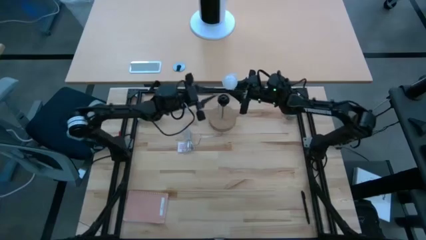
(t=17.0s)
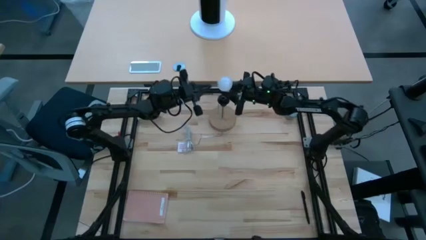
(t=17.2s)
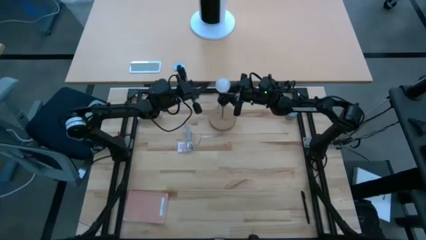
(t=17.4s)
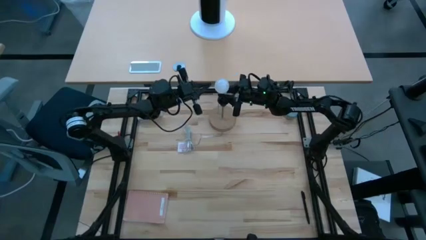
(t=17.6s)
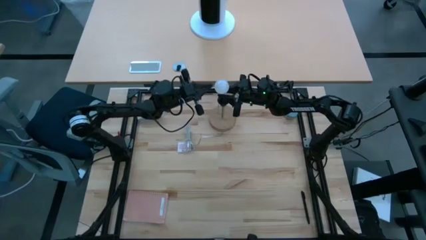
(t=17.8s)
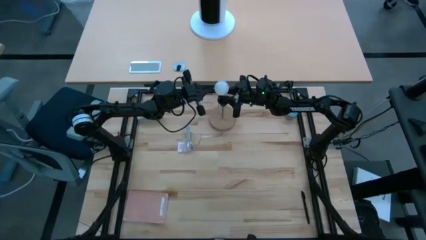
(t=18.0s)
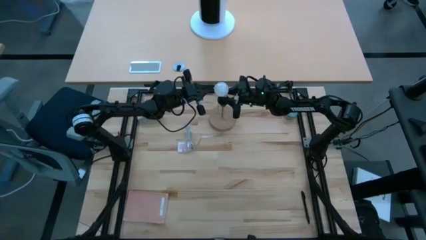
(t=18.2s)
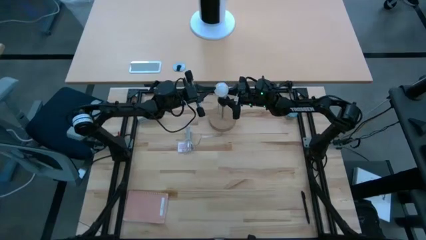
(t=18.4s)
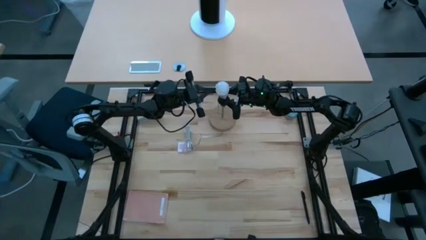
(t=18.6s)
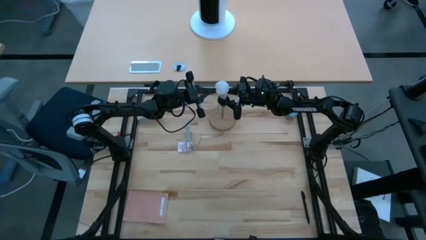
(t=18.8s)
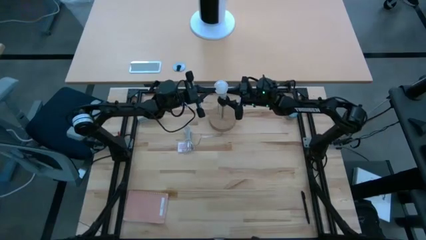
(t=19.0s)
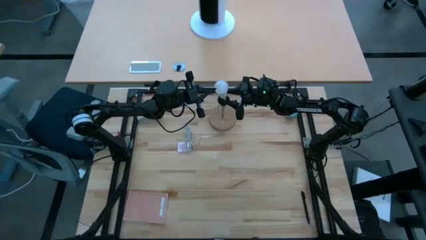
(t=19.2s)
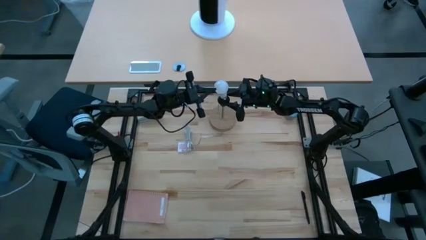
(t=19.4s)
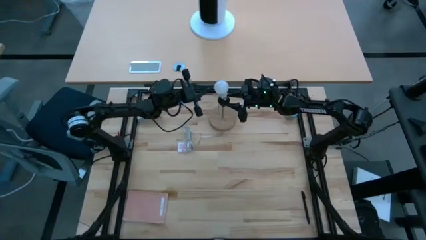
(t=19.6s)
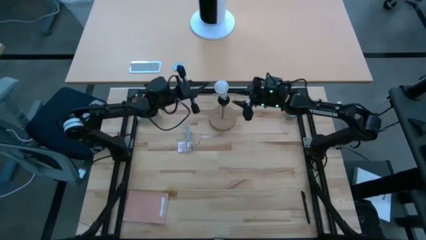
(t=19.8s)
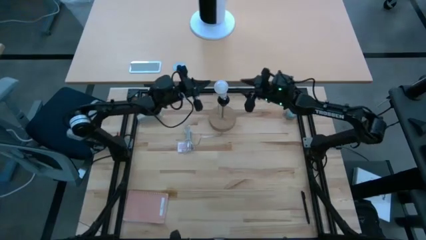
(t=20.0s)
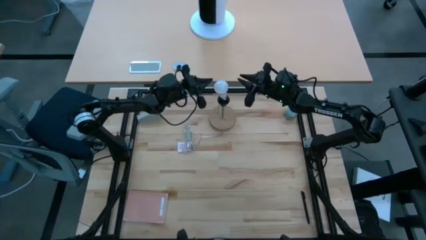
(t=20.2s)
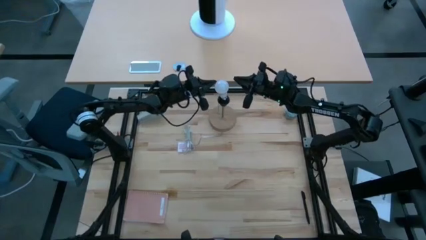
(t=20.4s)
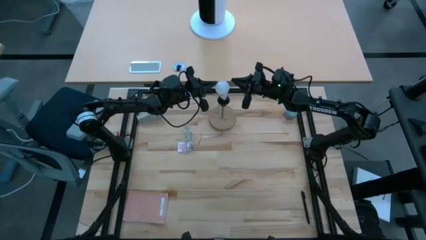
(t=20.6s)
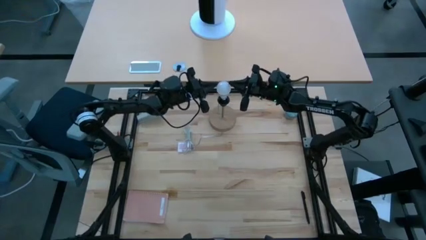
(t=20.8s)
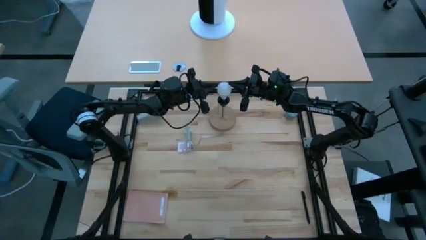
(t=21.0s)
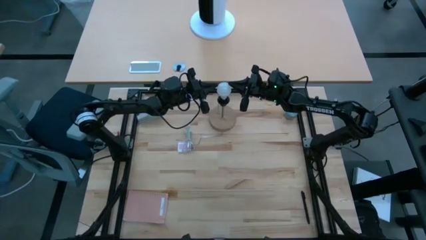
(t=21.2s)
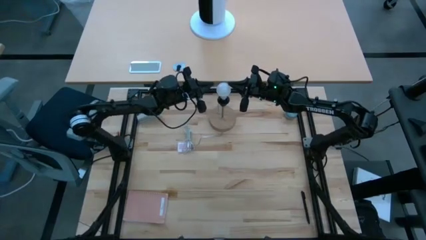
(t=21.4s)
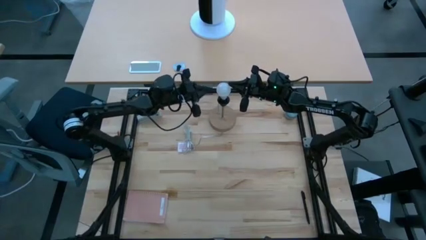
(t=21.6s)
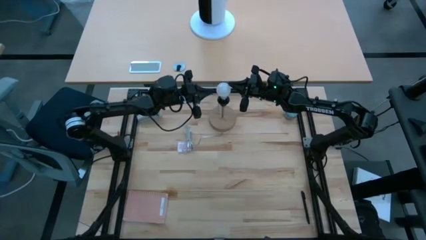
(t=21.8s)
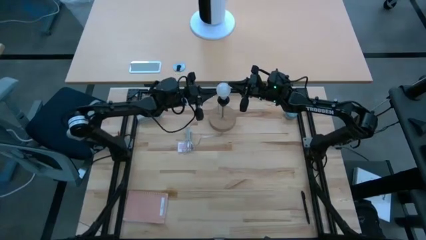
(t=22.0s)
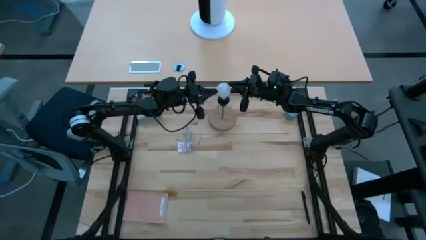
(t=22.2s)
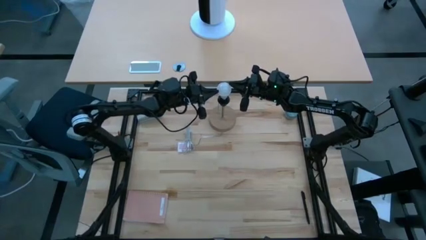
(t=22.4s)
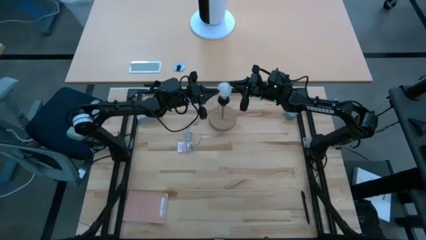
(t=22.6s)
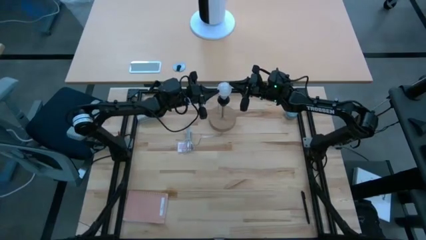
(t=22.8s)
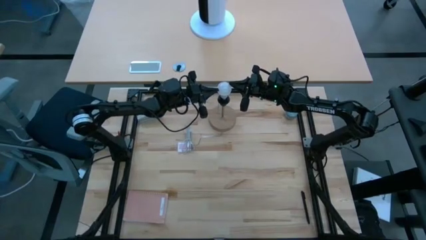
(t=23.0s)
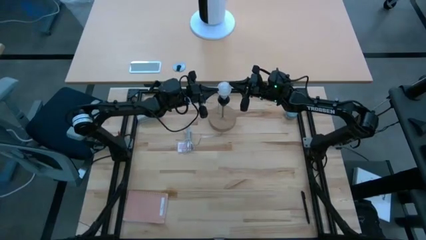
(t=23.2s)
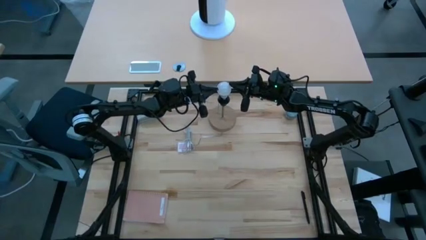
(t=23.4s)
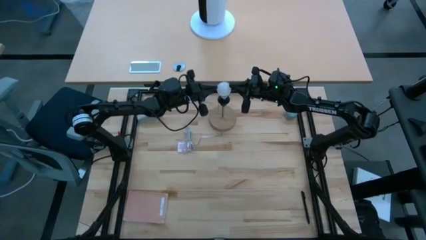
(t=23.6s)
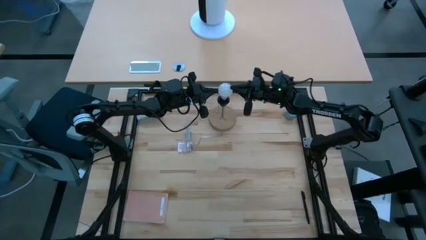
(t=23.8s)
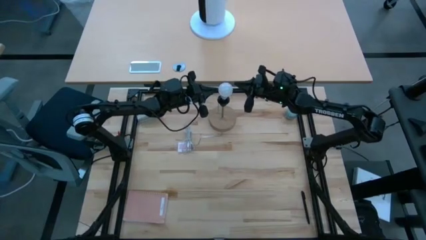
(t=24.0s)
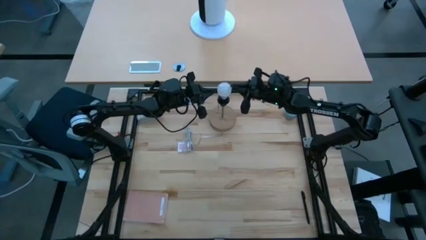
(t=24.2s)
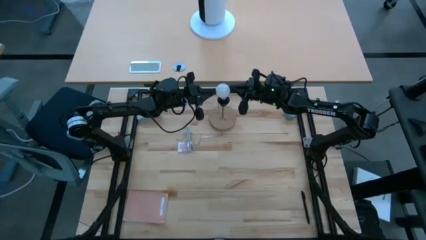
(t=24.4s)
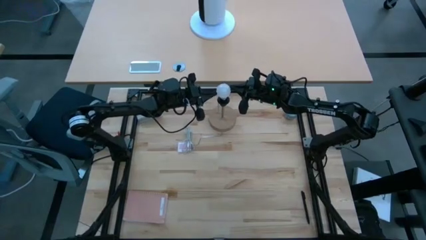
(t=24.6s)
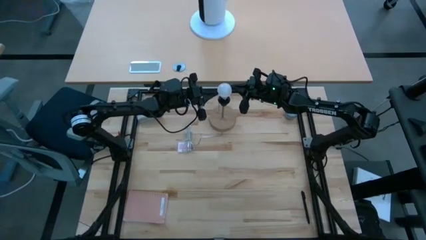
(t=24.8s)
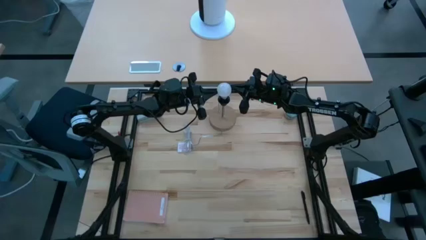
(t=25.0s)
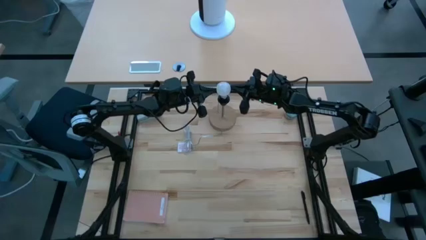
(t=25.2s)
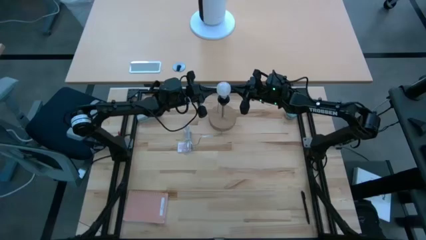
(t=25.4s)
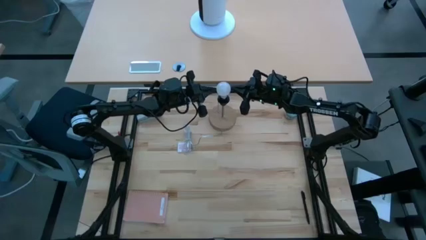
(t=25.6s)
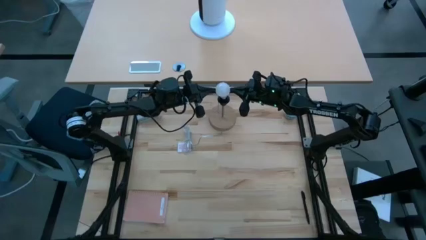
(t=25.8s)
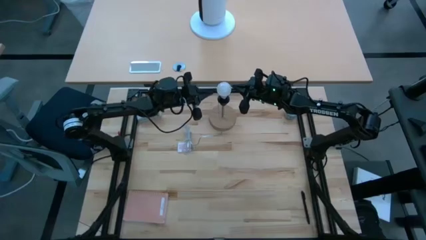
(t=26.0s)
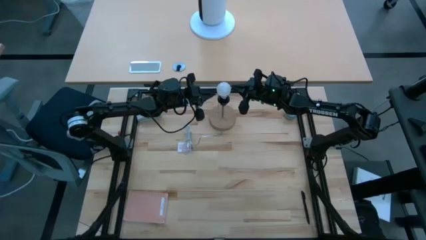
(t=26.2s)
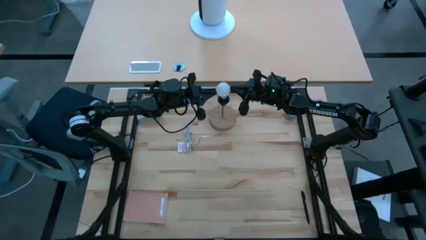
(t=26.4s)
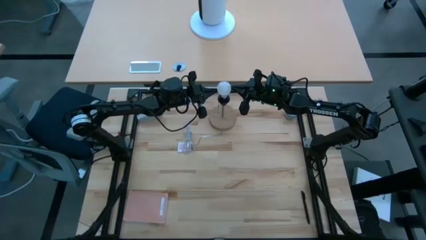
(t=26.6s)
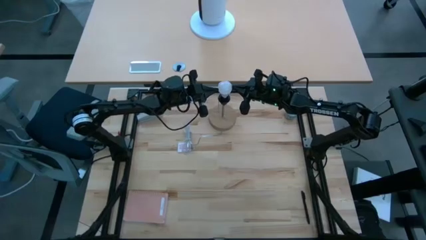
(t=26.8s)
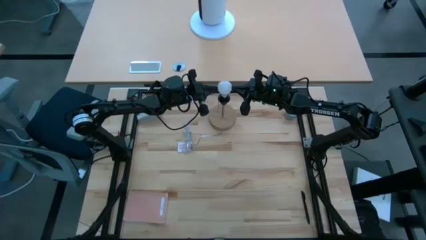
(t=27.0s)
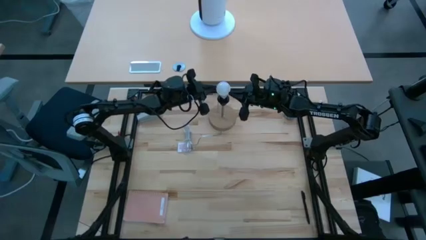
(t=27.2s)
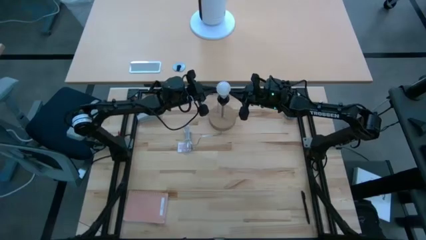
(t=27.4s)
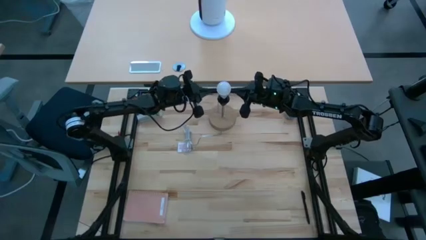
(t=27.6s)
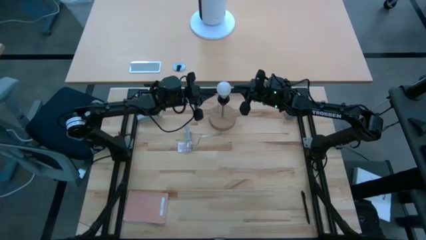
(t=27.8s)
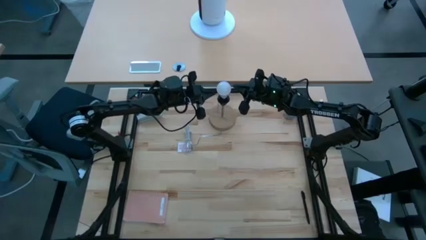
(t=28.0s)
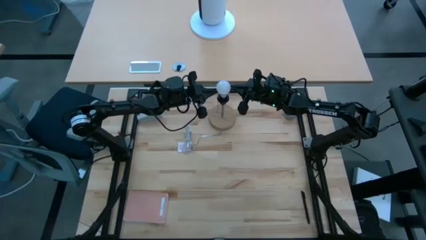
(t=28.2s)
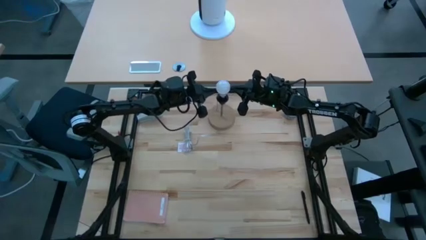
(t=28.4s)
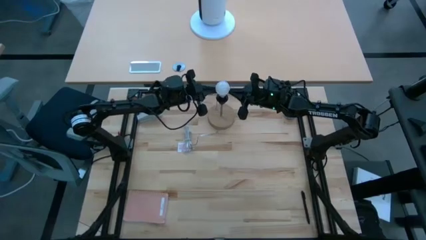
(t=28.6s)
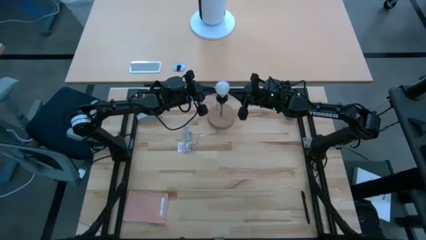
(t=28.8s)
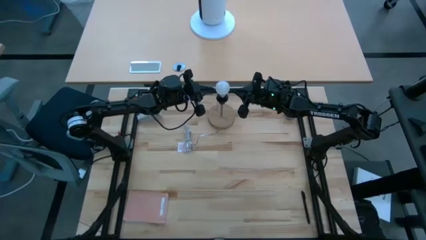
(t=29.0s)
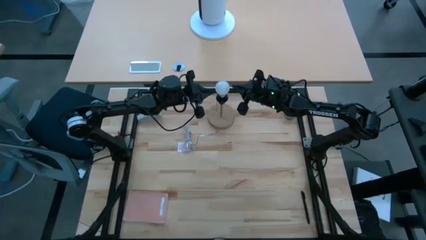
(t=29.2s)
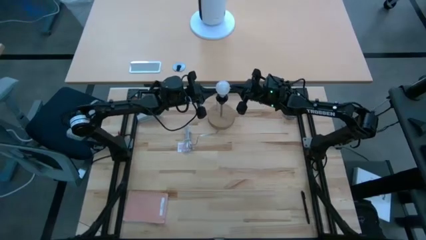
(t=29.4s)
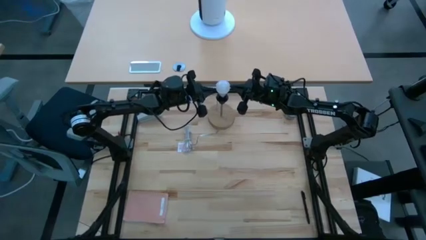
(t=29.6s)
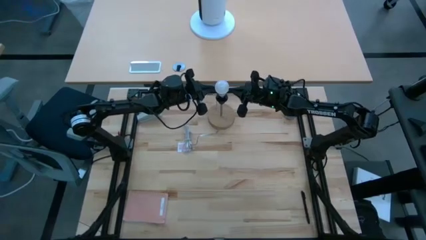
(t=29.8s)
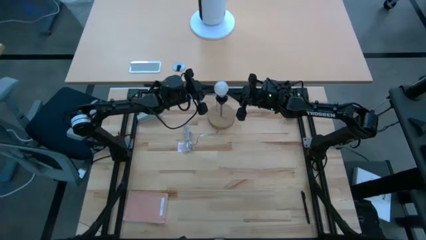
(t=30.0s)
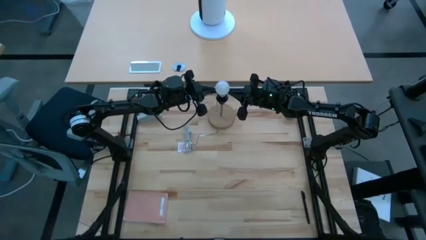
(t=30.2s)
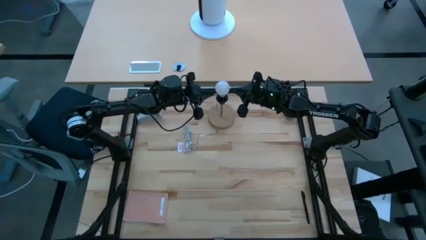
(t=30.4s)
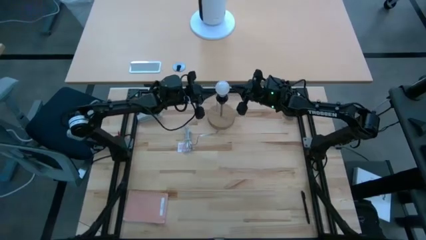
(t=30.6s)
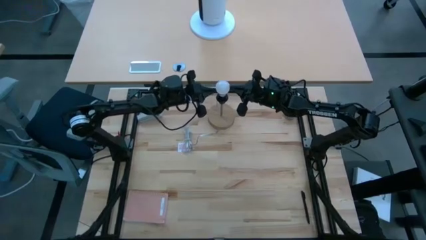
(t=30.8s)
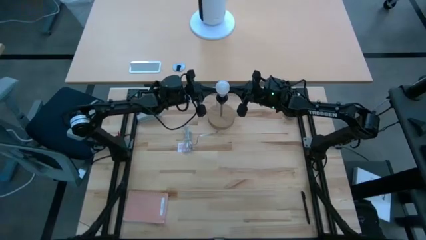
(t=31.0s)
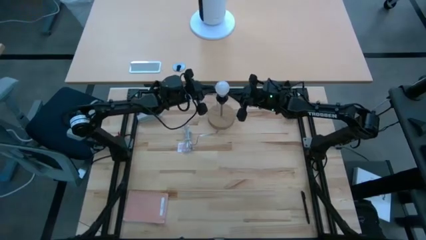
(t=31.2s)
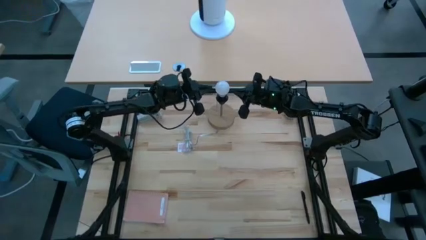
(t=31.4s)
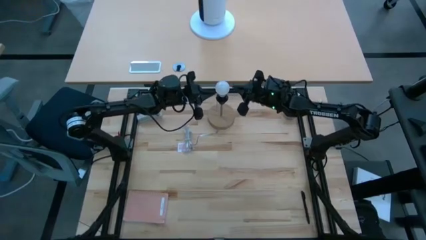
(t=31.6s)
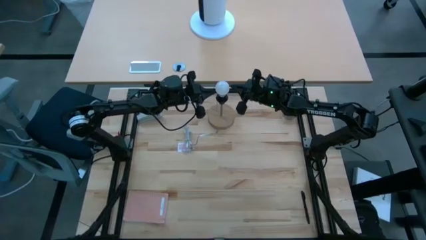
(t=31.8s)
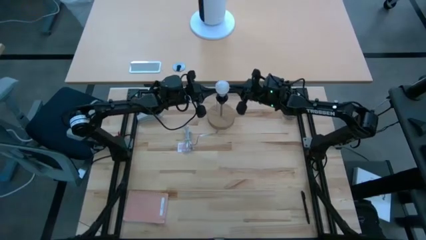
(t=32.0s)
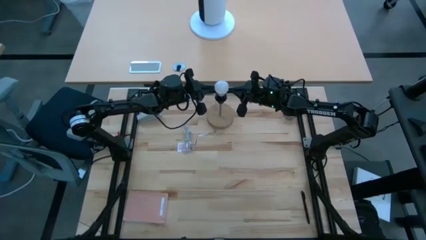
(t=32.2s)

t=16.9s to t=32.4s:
Task: Screw lightbulb
Insert the lightbulb into the desk lamp
